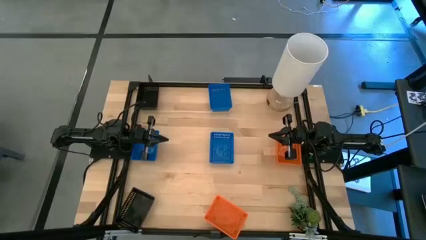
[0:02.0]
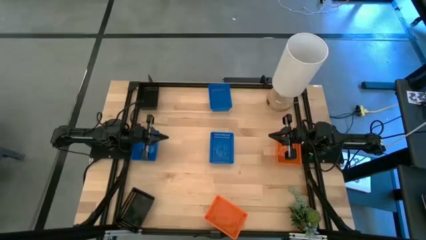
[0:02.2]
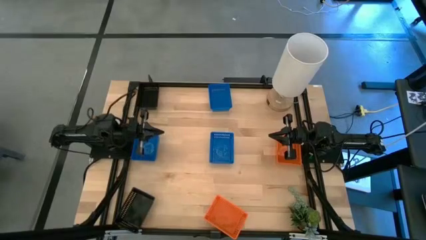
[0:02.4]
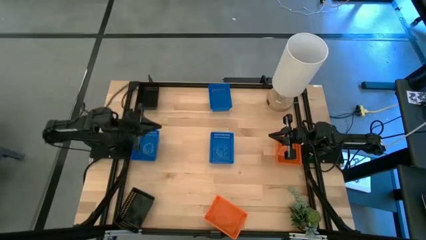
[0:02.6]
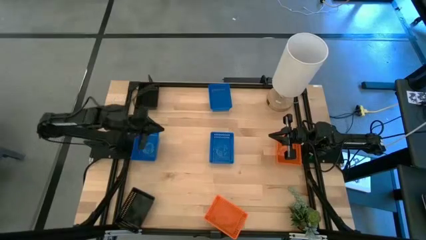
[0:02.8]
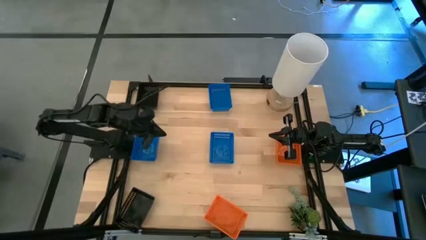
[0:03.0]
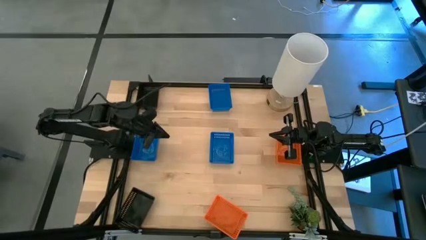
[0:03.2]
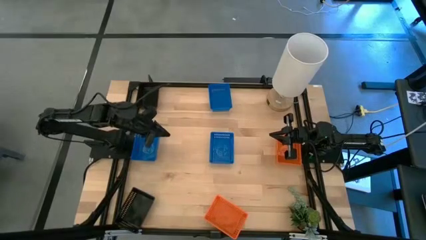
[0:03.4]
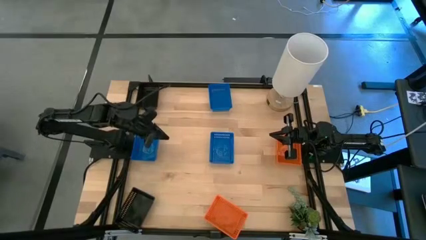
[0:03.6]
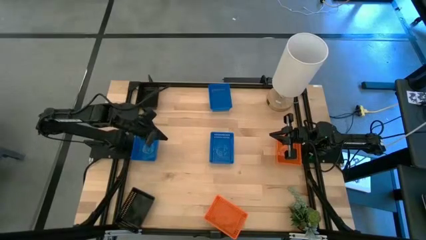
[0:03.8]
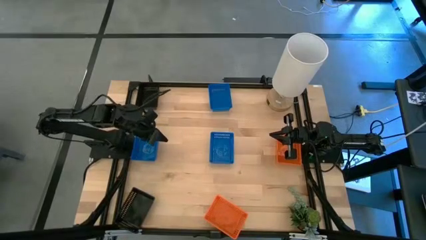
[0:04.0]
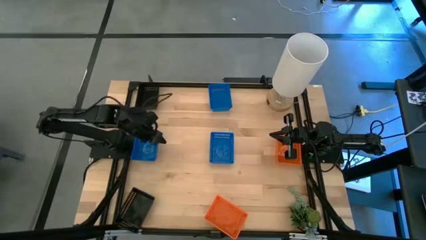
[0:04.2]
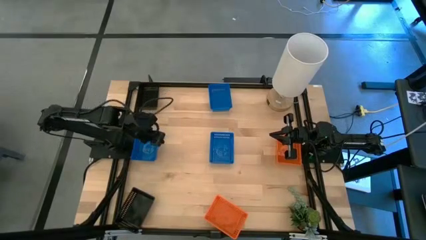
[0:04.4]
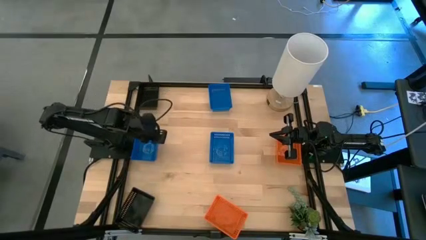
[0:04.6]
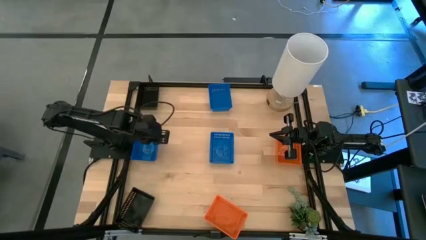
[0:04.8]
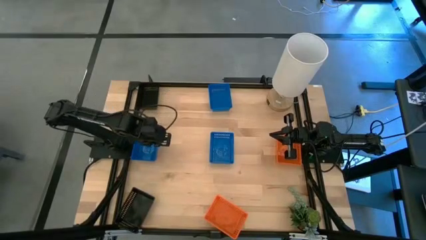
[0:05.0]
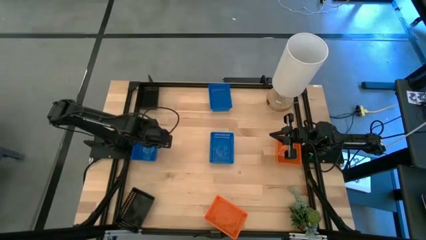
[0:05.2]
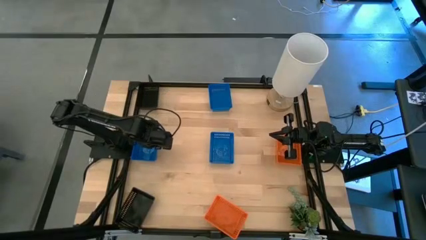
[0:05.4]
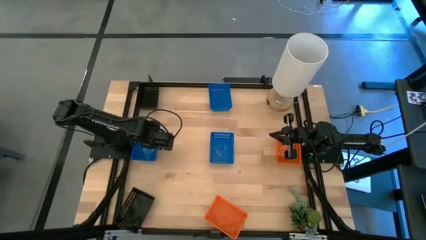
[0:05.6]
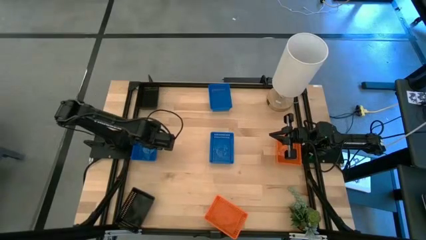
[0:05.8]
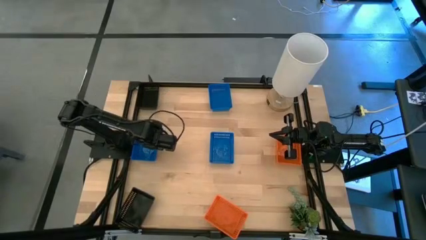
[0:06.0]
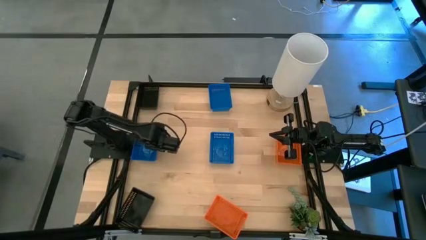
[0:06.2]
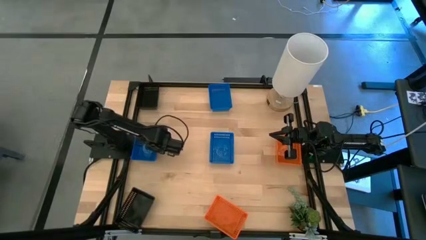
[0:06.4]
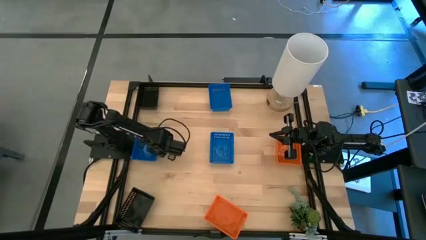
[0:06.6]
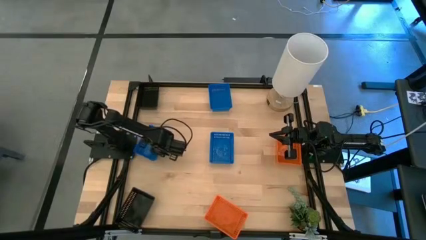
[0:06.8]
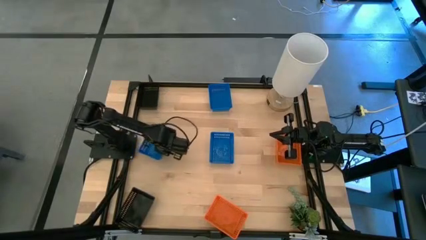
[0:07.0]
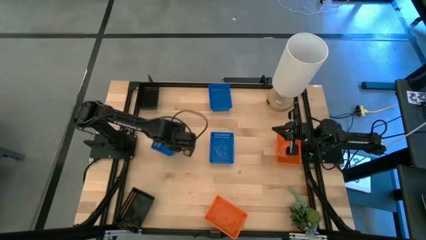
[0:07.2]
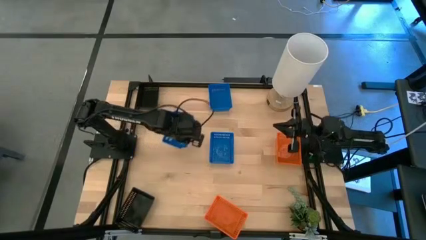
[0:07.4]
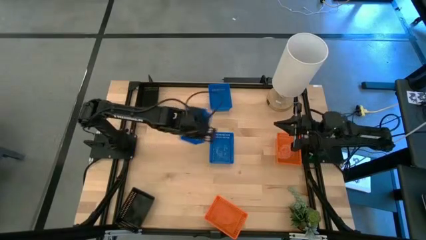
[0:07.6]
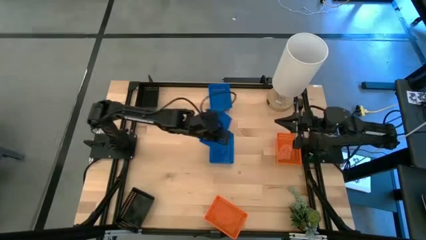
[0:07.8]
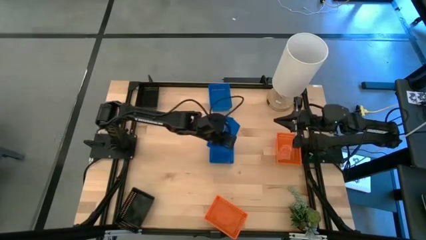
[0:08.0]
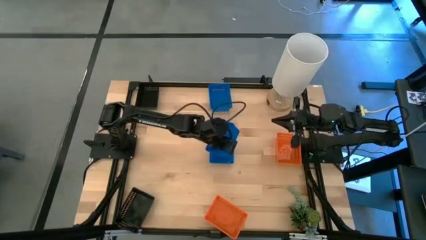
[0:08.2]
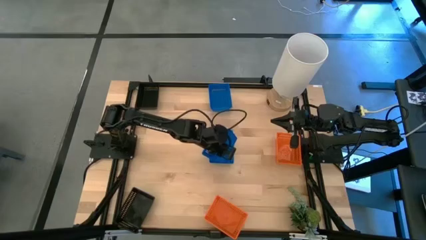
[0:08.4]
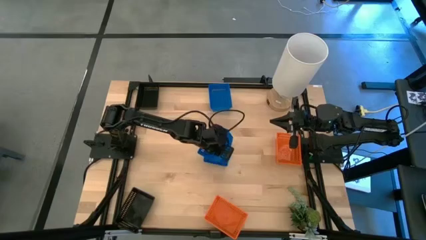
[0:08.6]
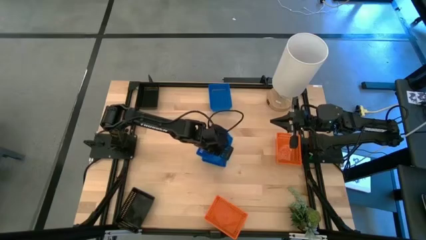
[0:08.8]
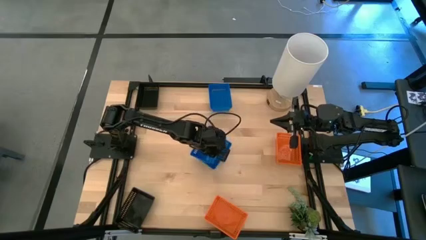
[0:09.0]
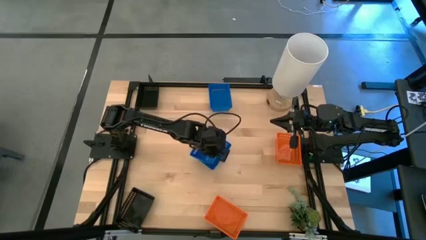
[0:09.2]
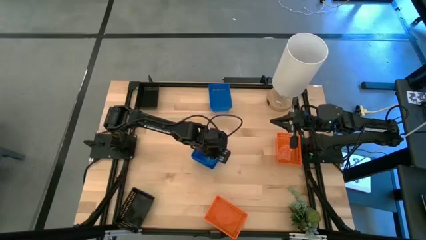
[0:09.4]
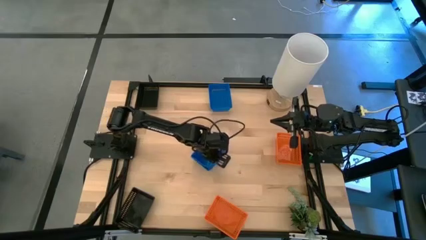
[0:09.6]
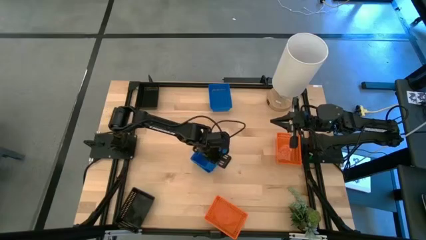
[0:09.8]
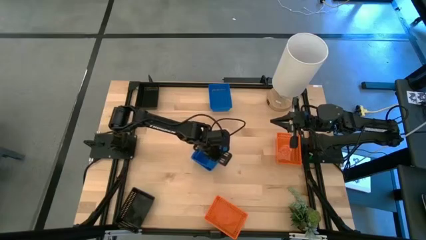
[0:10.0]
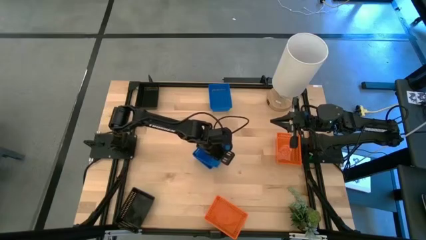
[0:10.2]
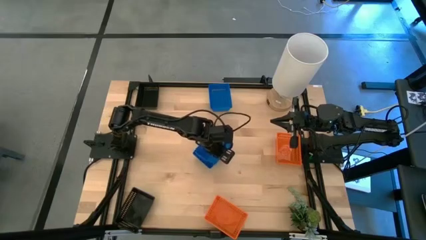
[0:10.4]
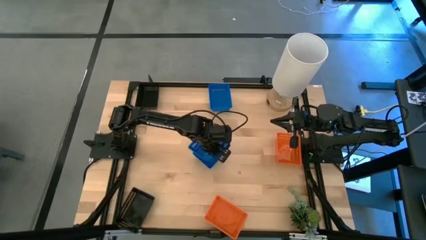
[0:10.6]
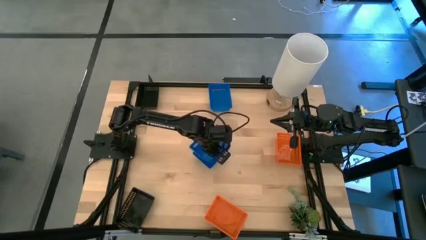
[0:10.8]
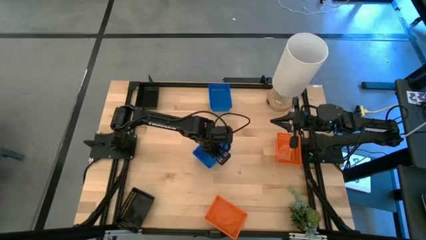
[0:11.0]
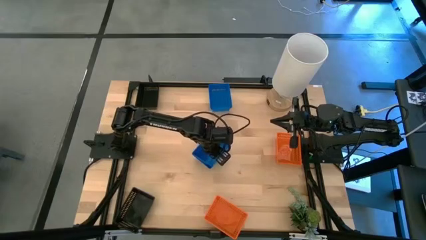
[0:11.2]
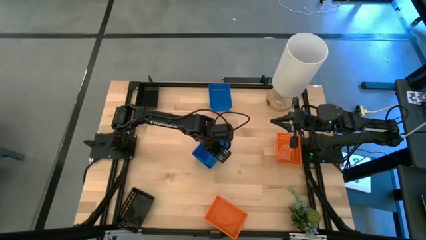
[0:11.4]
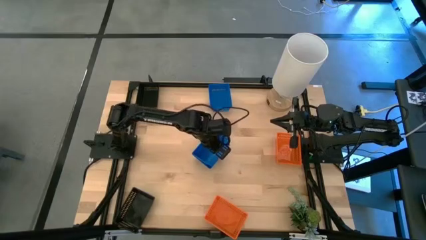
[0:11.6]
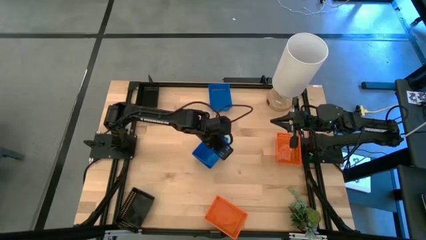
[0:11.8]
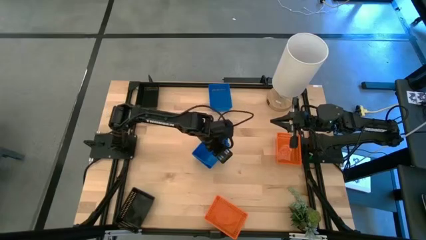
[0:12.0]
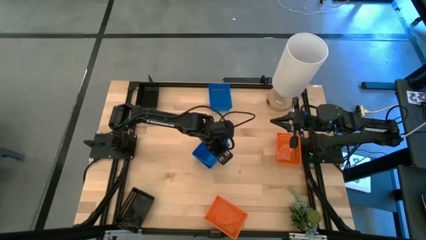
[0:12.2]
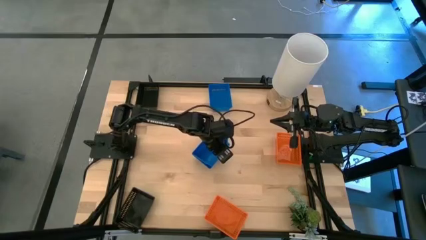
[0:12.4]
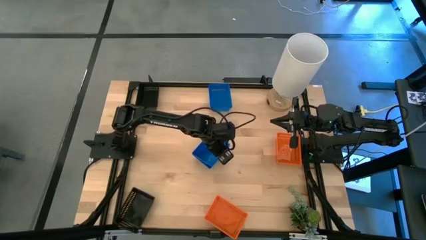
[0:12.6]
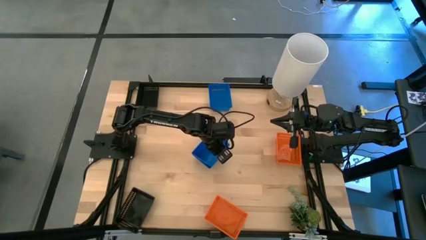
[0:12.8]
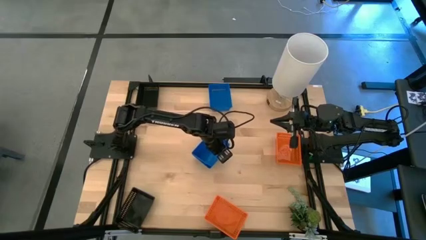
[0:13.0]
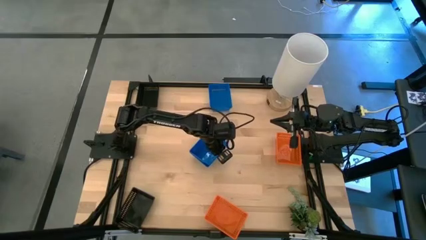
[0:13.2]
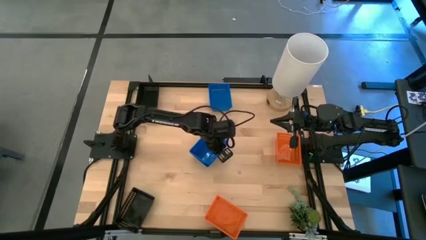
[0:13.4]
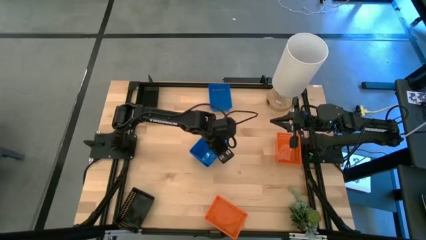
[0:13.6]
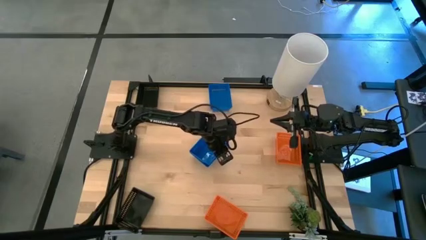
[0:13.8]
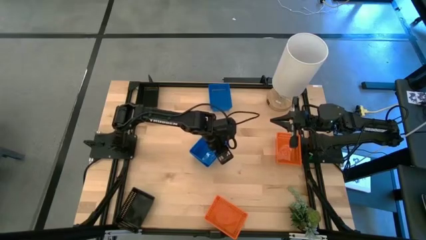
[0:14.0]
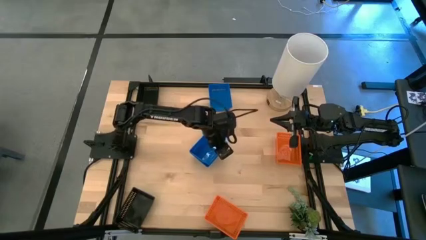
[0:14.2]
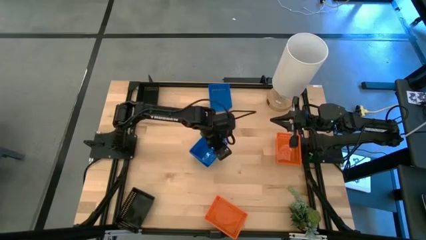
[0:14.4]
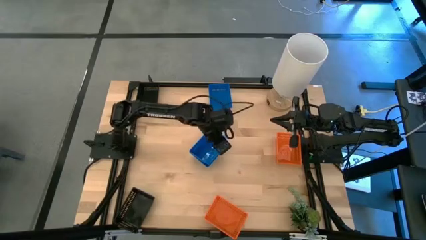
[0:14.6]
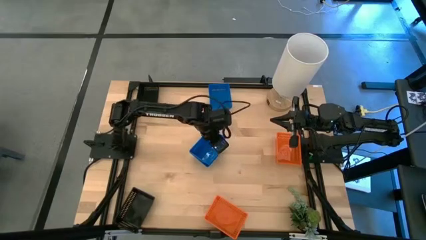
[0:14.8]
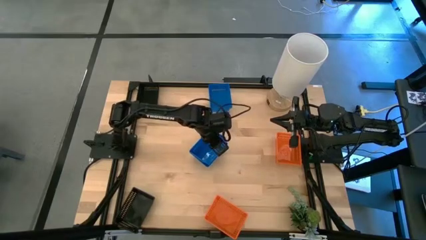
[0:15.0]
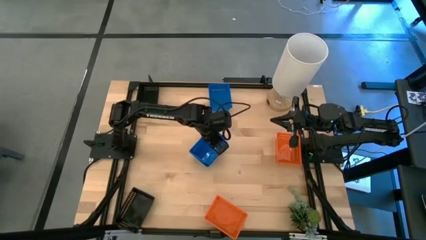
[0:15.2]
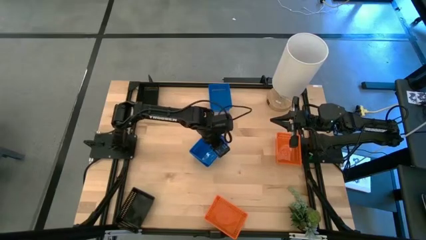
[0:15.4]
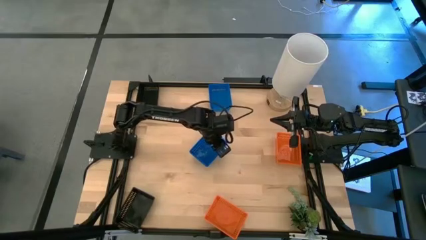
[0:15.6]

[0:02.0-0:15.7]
Stack the bottom left blue bin on the bottom right blue bin
